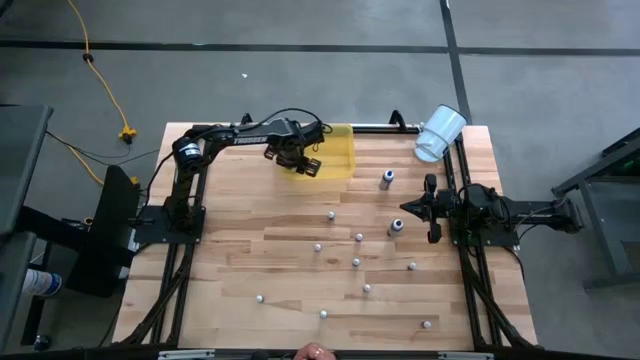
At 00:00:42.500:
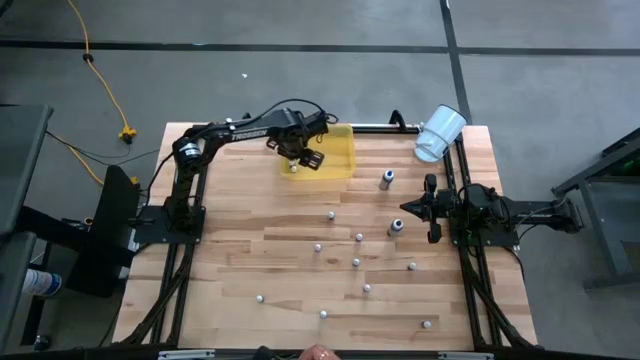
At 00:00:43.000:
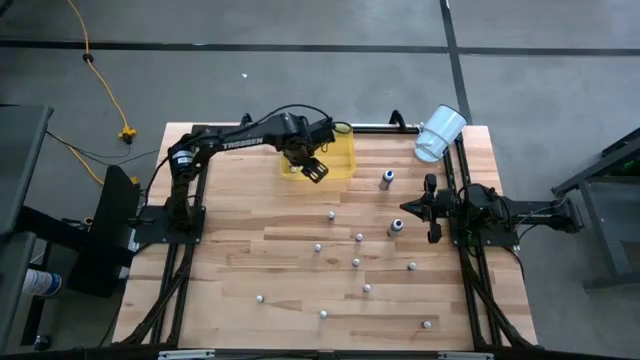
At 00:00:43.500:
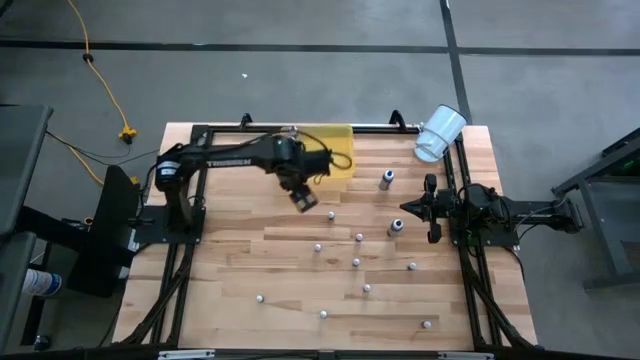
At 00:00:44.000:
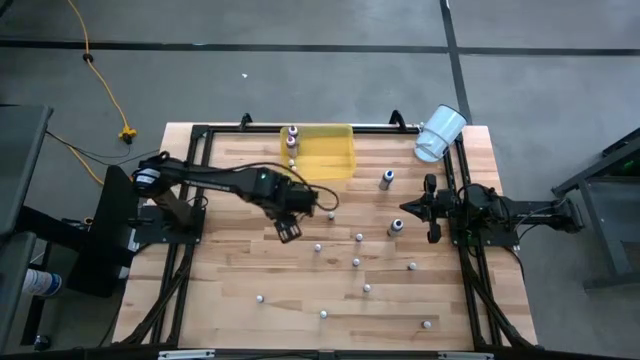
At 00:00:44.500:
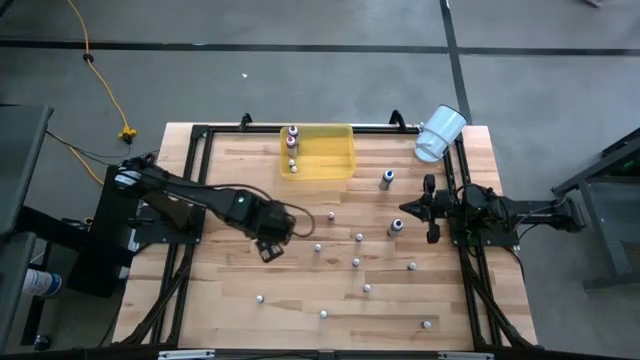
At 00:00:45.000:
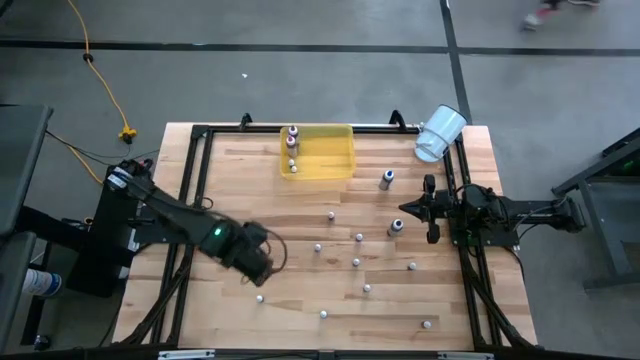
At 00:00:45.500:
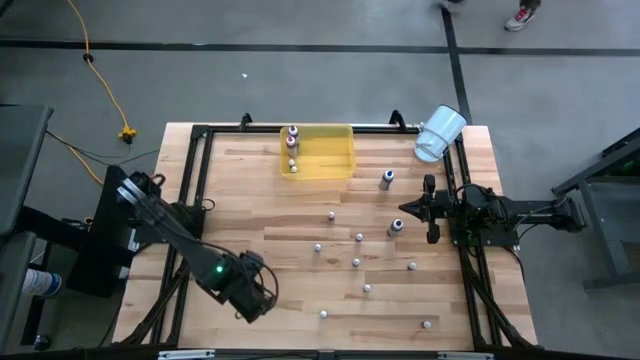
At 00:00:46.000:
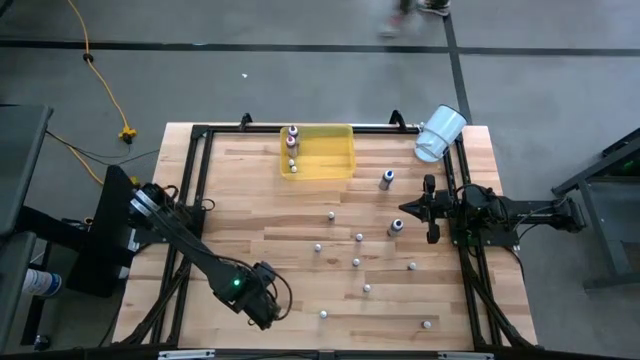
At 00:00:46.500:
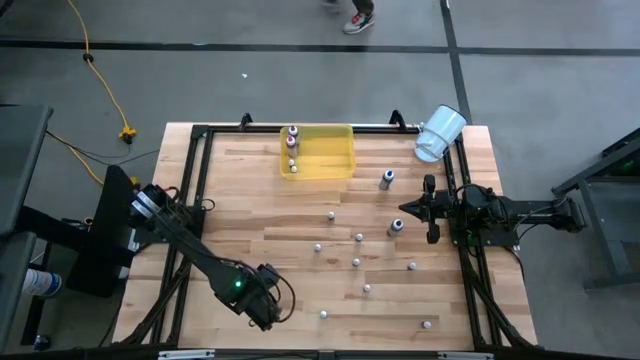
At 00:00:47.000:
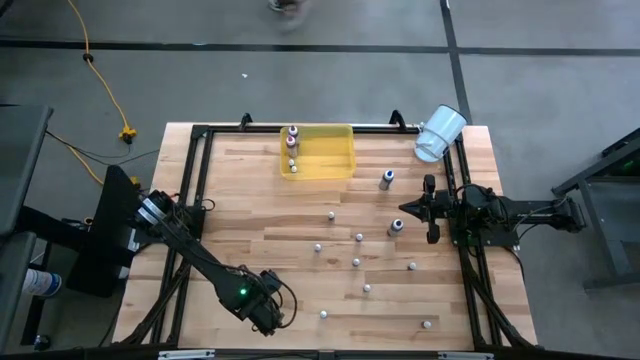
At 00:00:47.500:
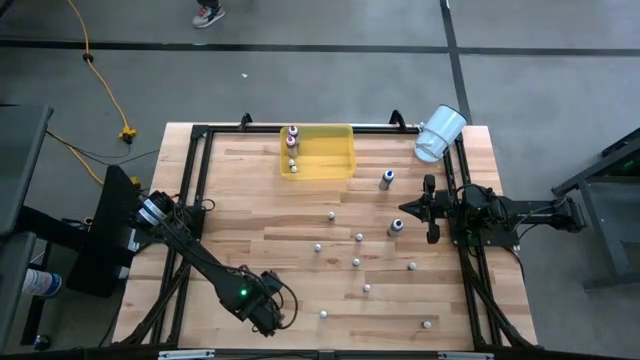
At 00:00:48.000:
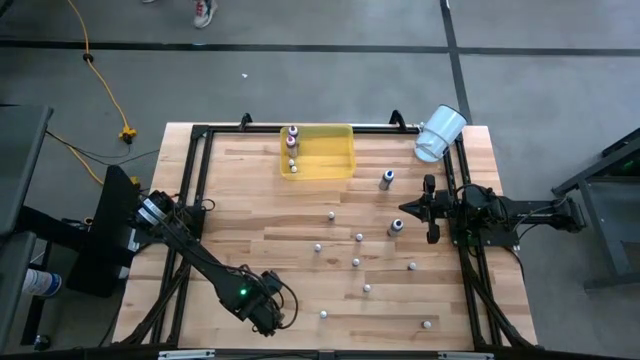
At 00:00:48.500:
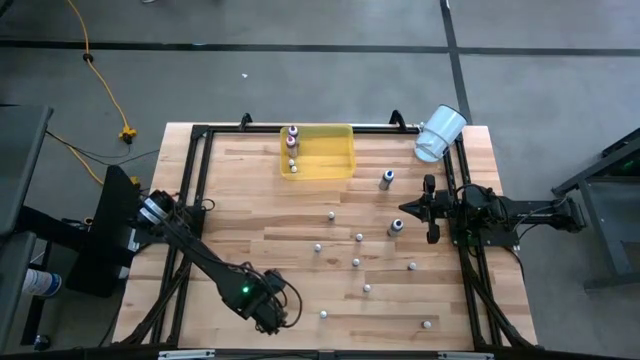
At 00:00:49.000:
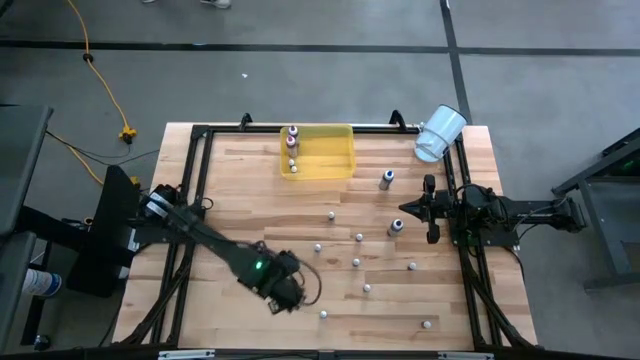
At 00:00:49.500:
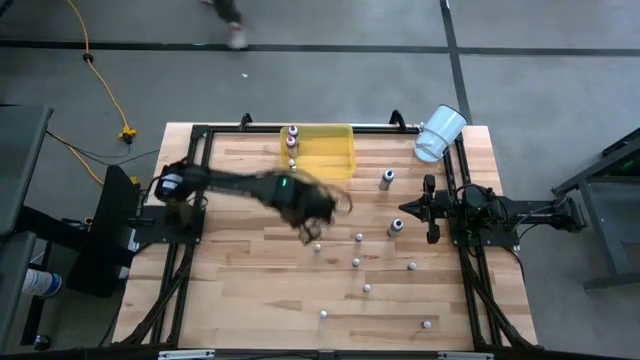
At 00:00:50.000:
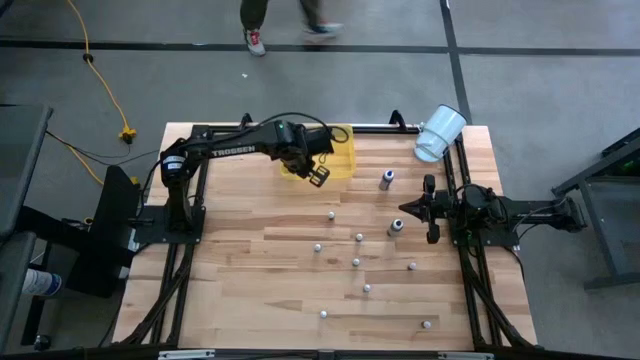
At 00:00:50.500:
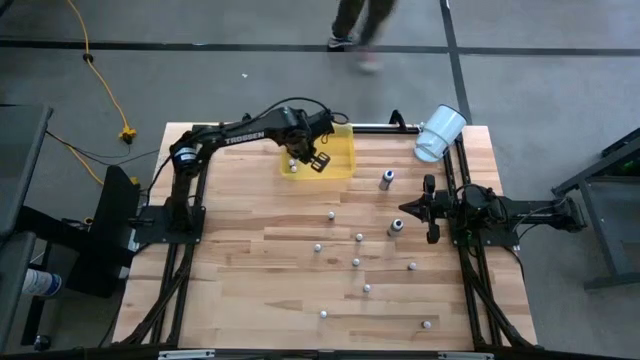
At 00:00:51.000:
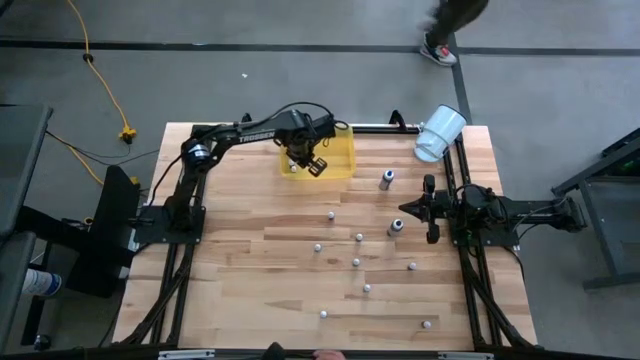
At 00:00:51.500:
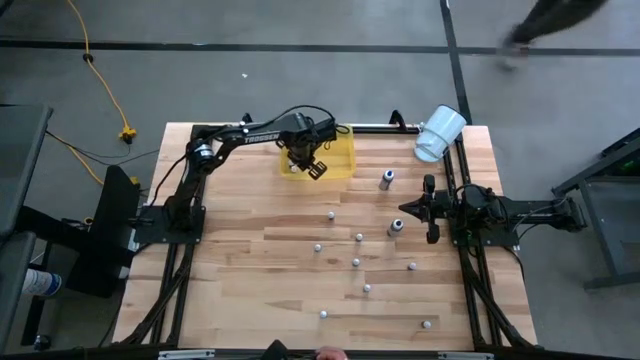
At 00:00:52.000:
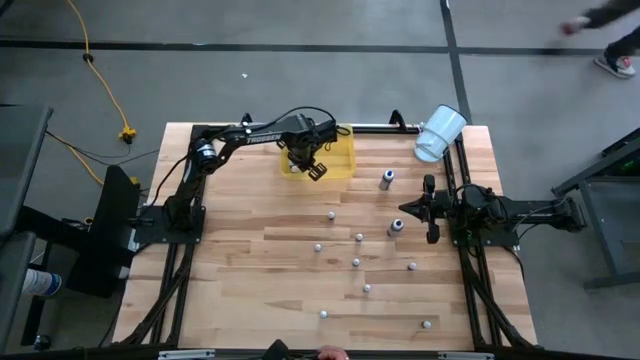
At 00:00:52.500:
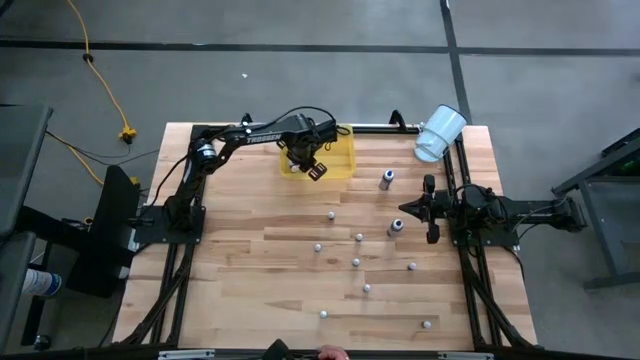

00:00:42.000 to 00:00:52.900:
Task: Pick & Place food coloring
Put the small orange food coloring bottle into the yellow container

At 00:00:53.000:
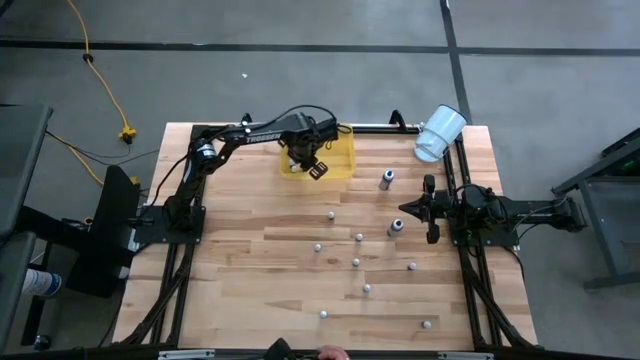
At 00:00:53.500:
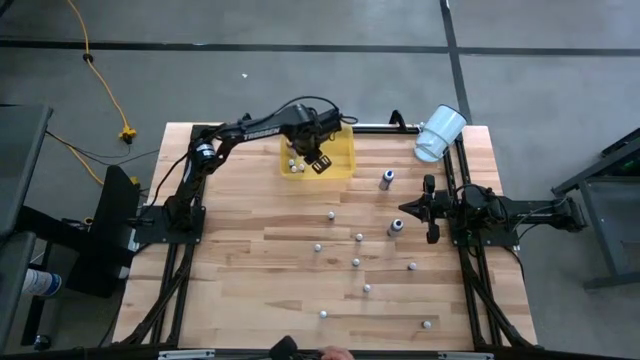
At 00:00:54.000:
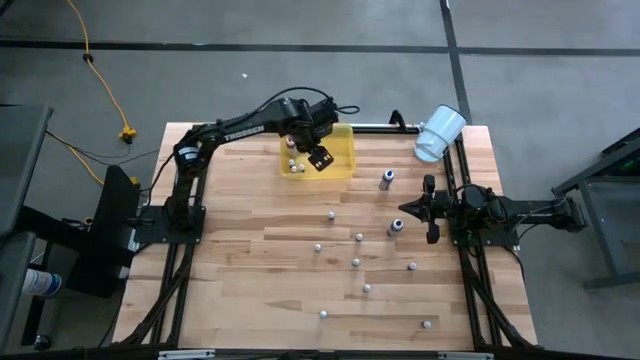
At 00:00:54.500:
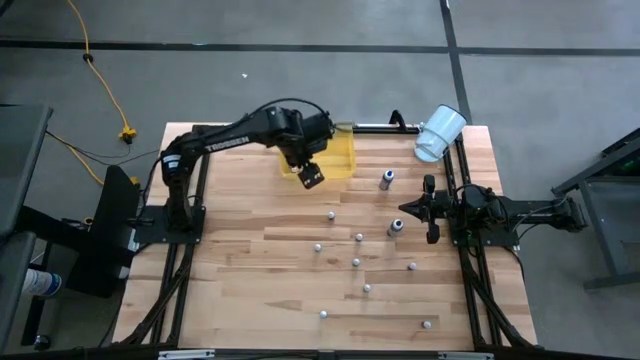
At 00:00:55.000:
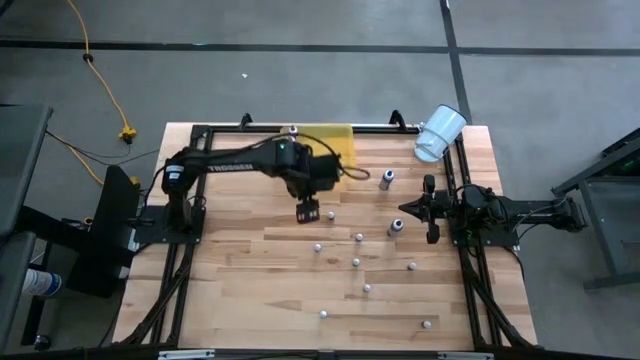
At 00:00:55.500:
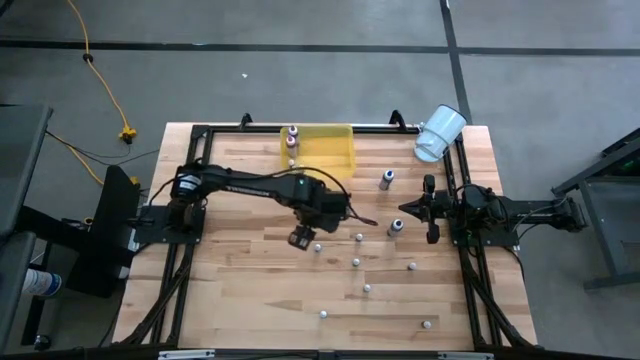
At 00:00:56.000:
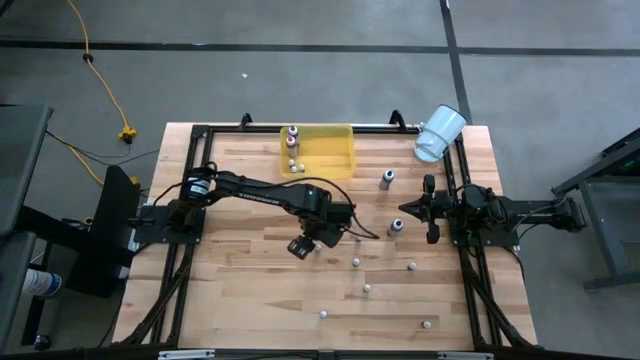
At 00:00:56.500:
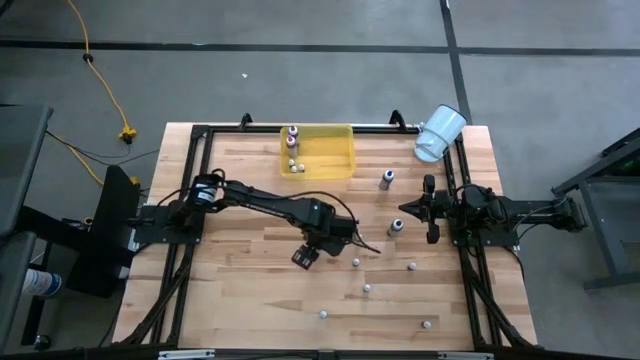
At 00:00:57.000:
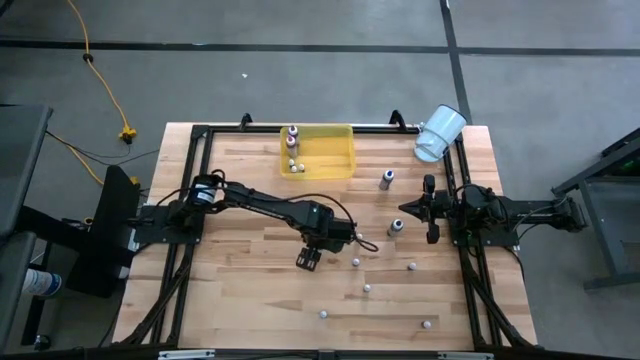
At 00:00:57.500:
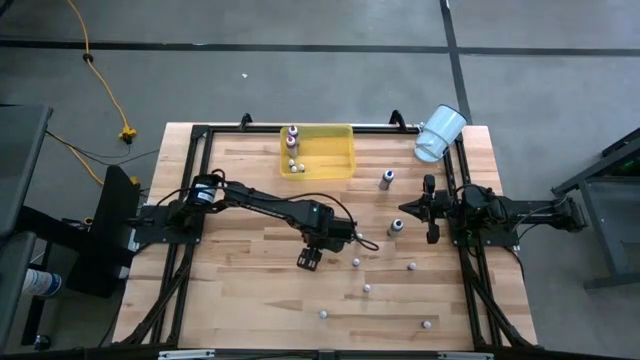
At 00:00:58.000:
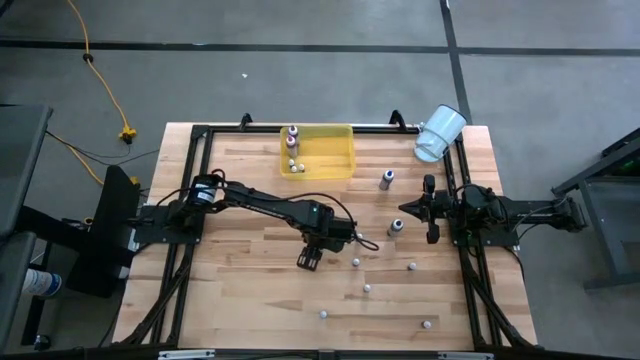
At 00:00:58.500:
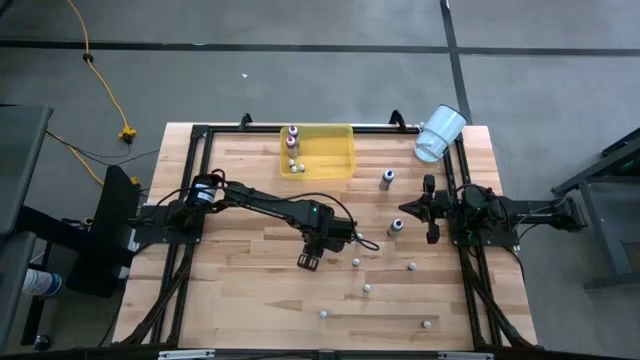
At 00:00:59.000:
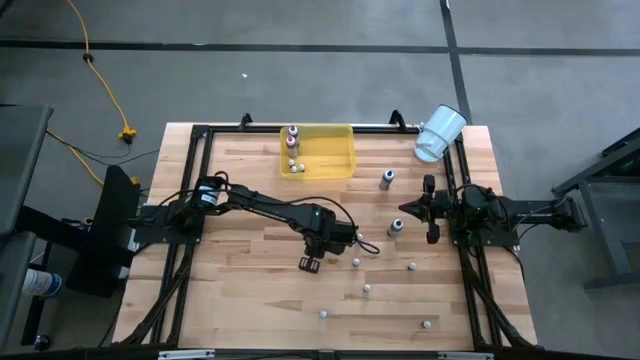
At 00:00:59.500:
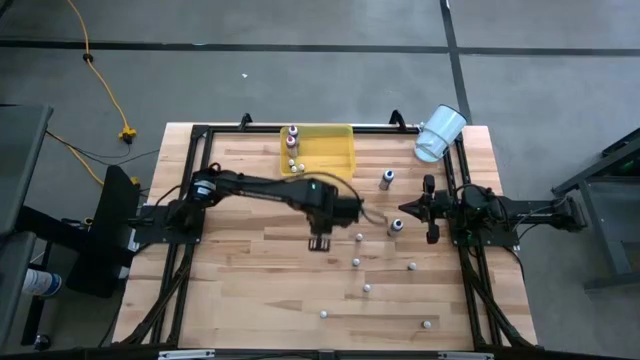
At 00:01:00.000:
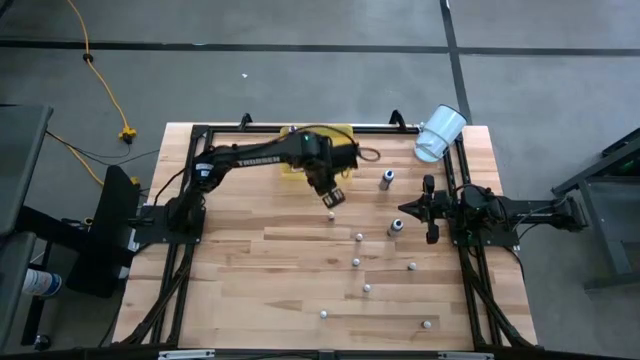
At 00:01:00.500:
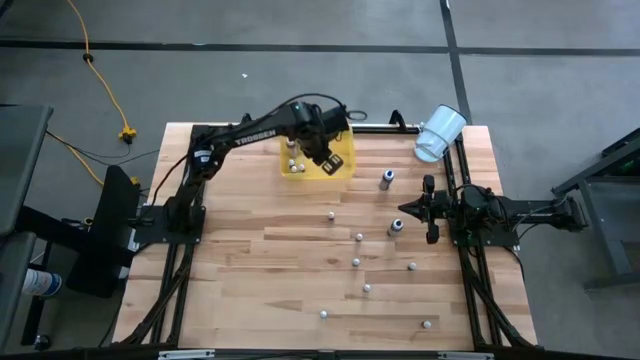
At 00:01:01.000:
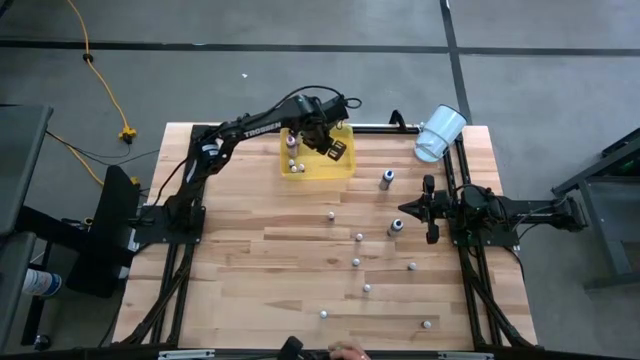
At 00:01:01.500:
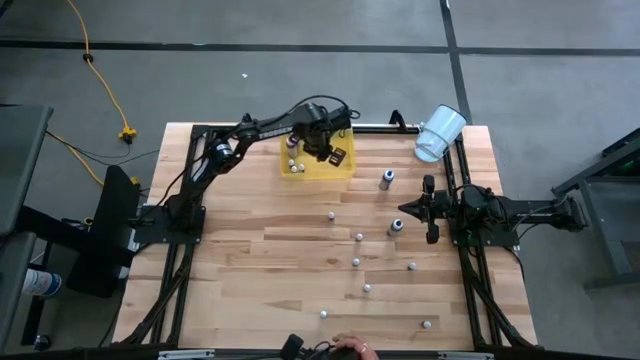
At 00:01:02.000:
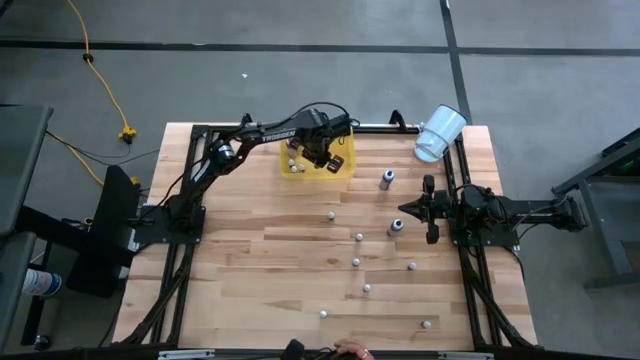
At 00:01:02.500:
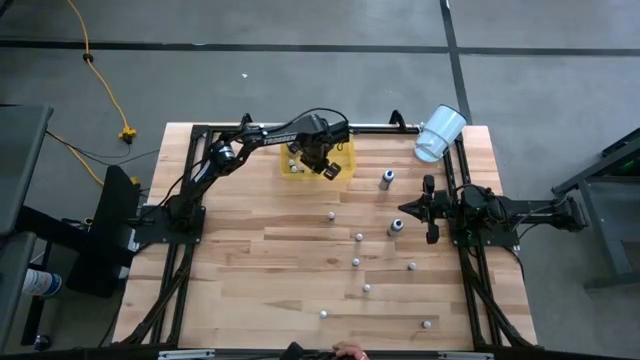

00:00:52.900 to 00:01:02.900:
Put the top small violet food coloring bottle into the yellow container

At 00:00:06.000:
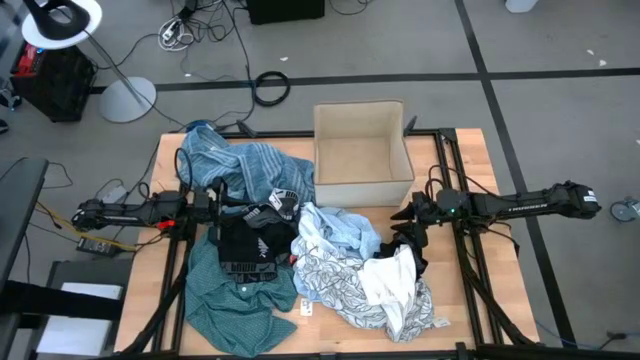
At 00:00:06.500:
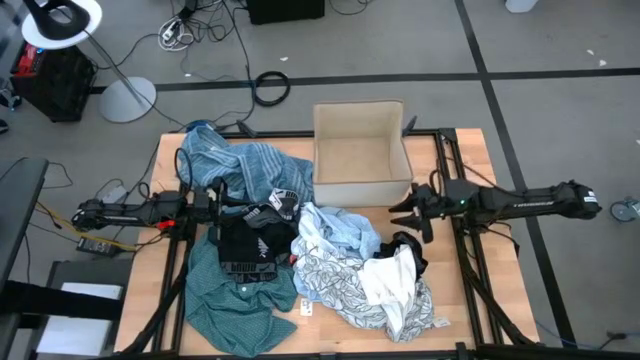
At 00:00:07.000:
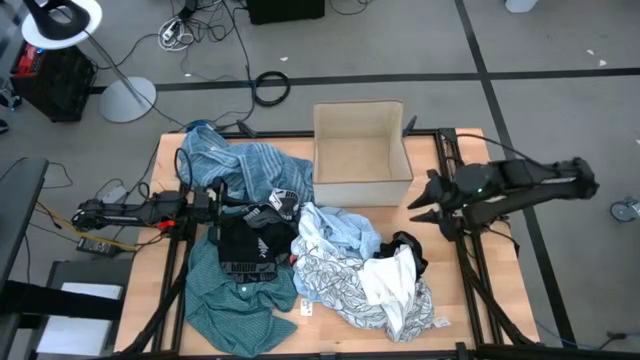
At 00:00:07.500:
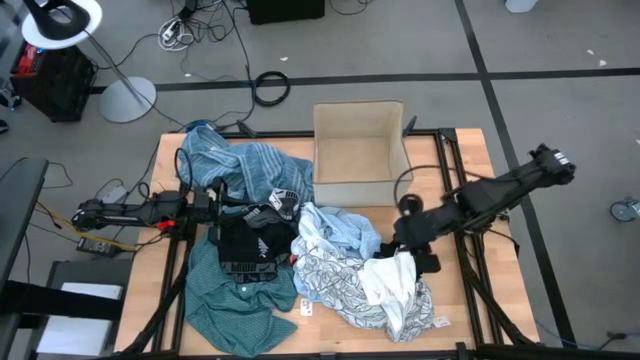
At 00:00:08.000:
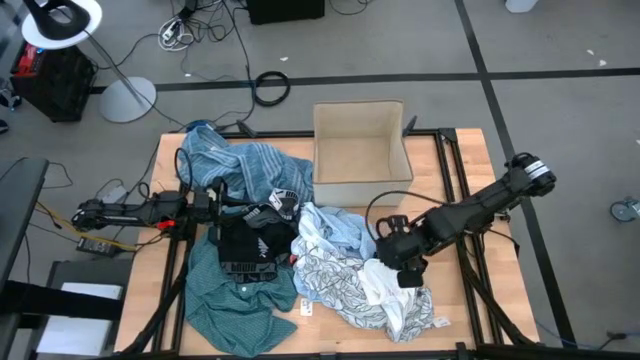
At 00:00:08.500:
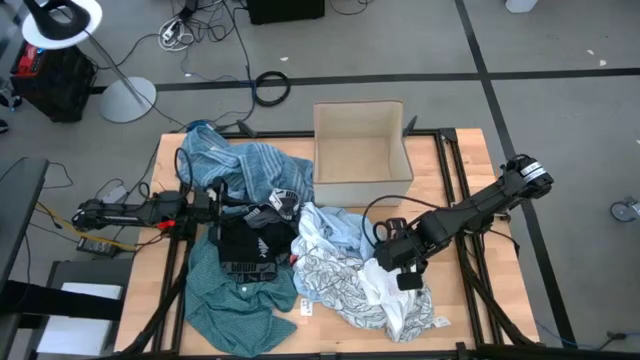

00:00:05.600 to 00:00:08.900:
Task: Sort clothes
Put the white boxer shorts into the gray laundry bin
